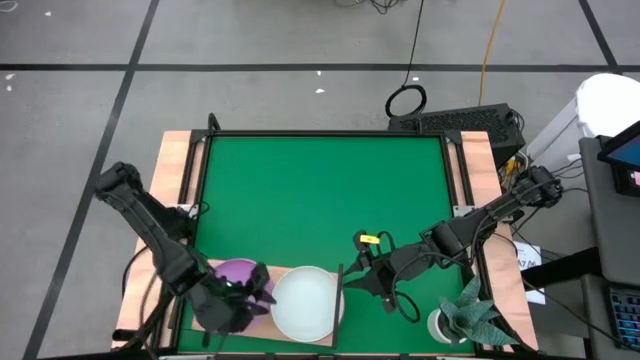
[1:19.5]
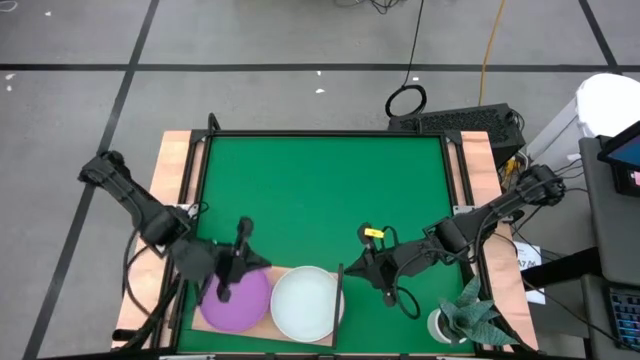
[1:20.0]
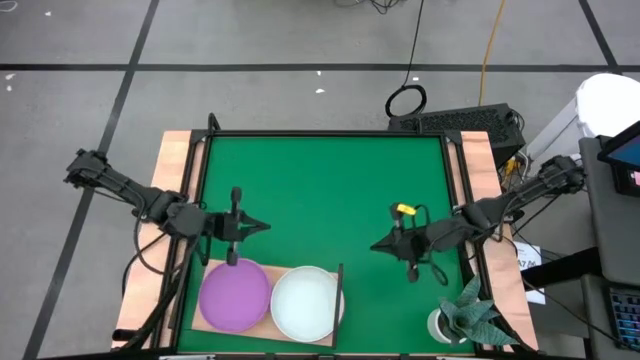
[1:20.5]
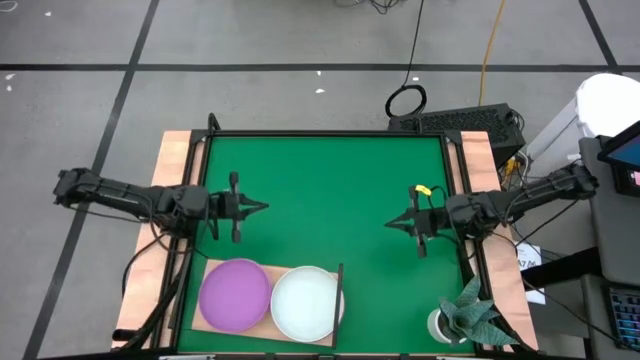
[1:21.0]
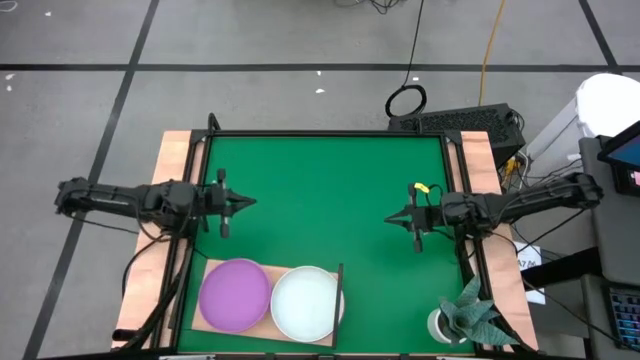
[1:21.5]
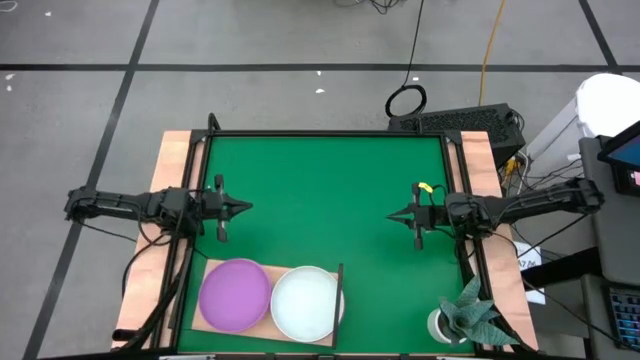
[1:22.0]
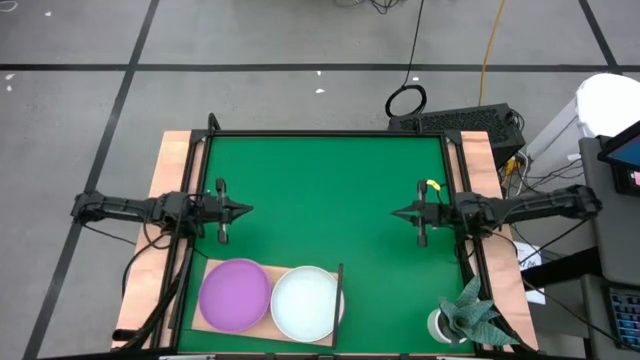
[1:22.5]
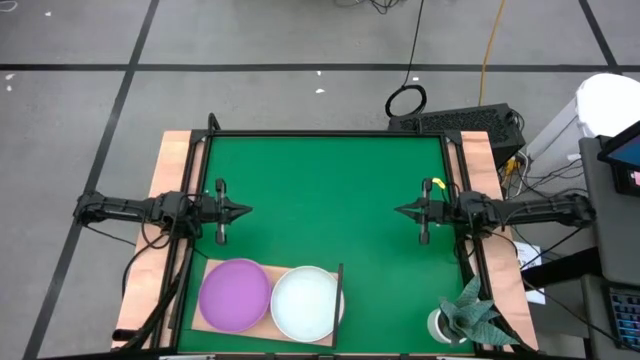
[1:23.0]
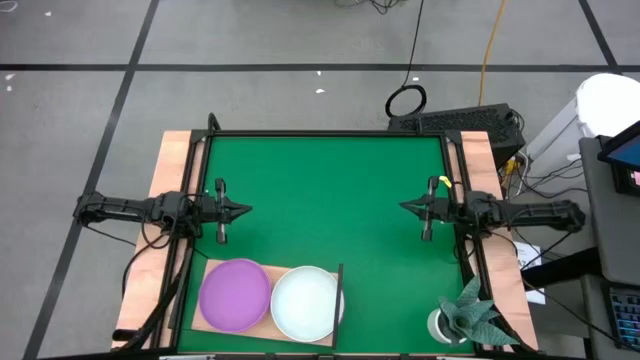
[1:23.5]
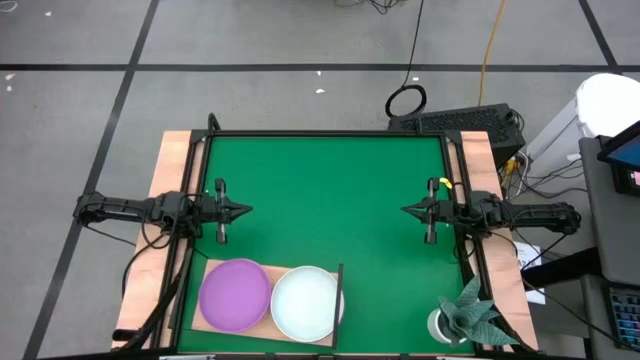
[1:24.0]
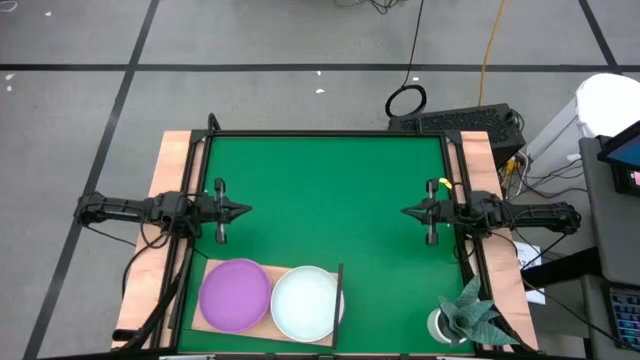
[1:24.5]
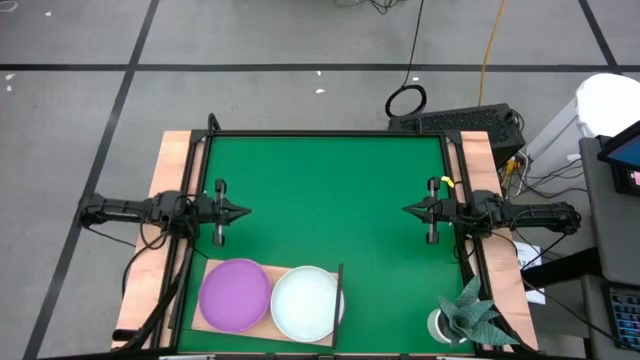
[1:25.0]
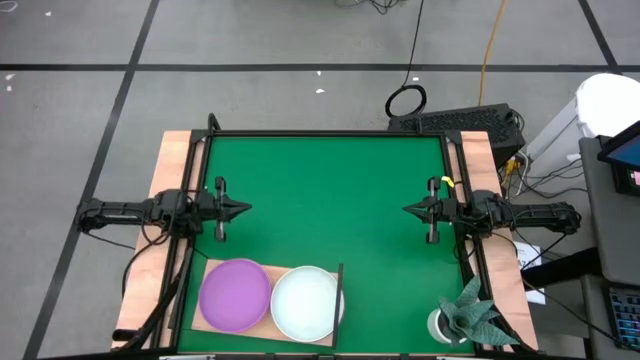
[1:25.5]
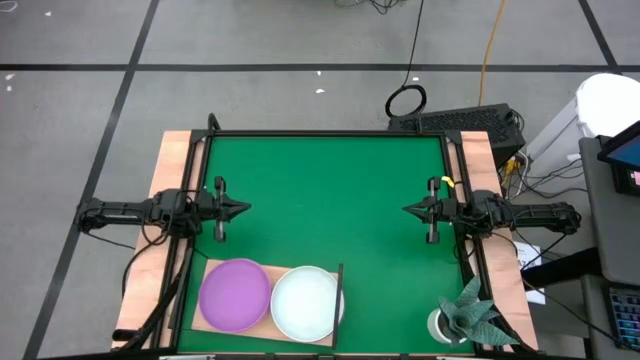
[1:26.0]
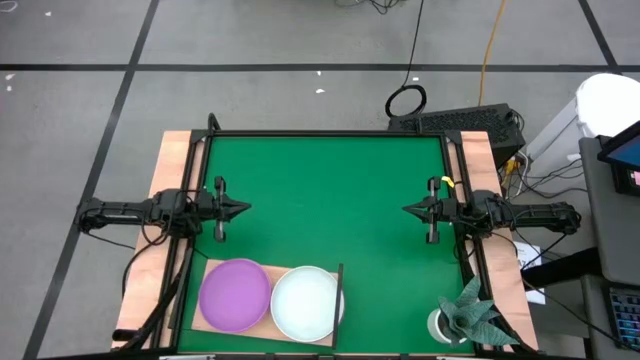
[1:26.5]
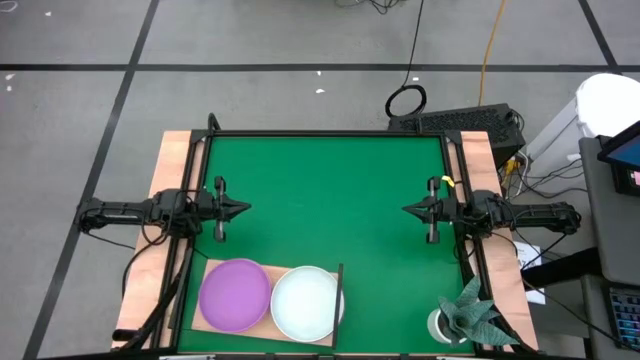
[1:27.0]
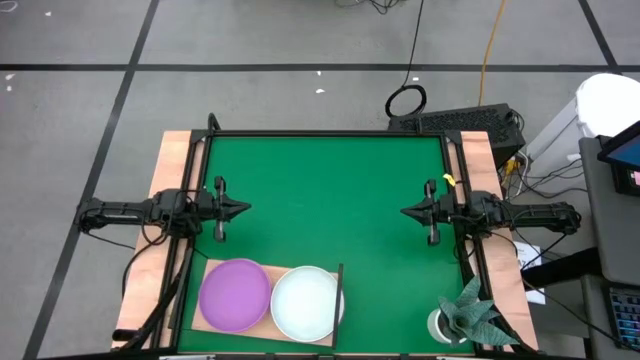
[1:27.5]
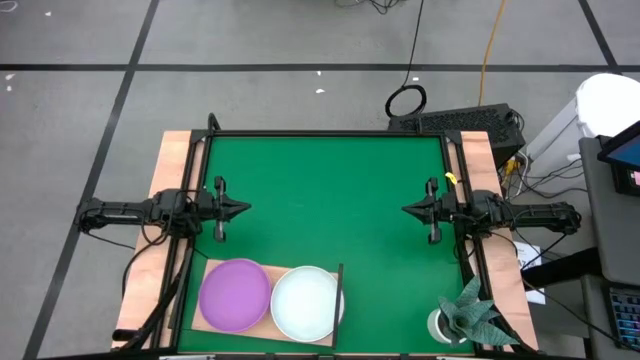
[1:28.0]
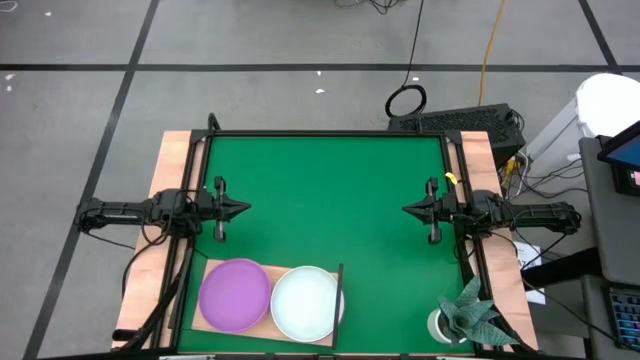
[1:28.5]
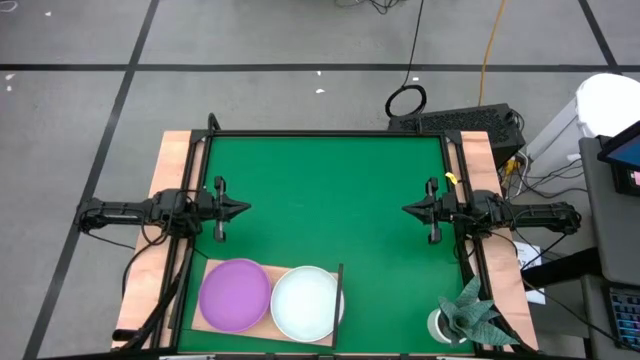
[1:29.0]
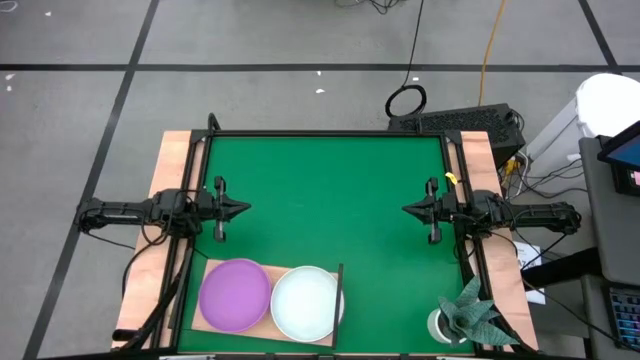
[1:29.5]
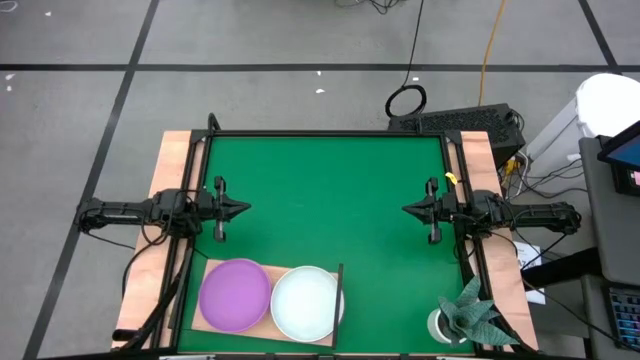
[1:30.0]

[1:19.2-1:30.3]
Task: Place and stack plates onto a shelf
Return to Home Position

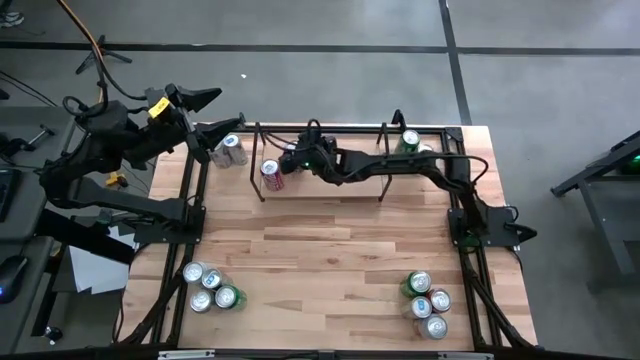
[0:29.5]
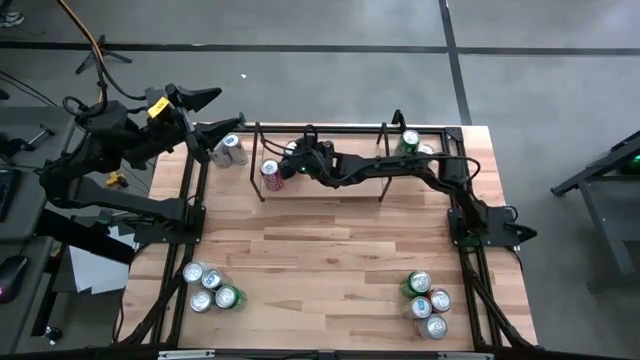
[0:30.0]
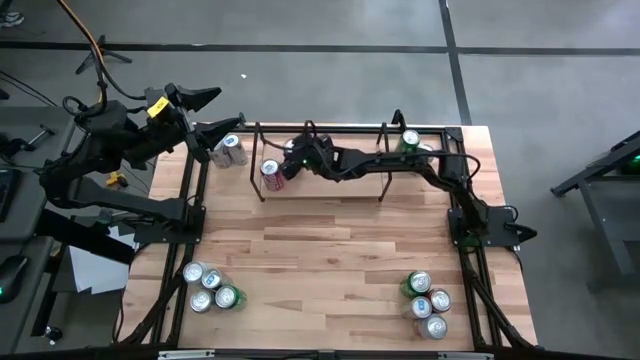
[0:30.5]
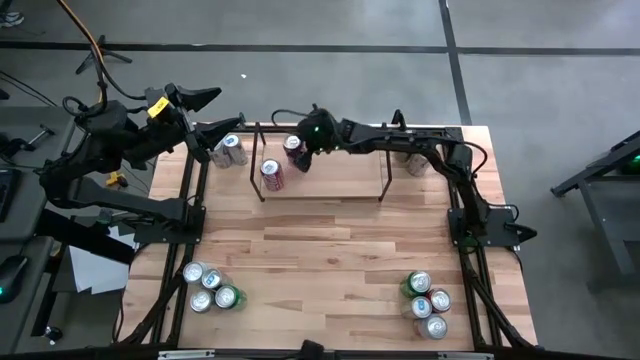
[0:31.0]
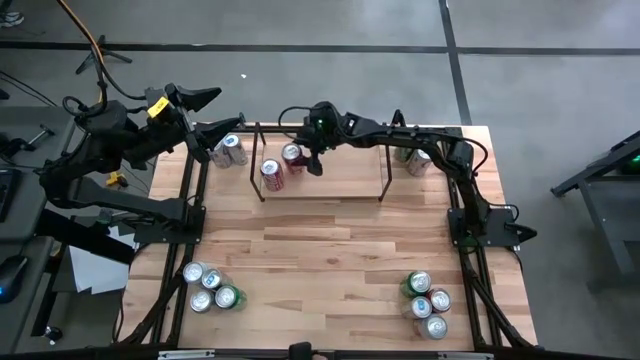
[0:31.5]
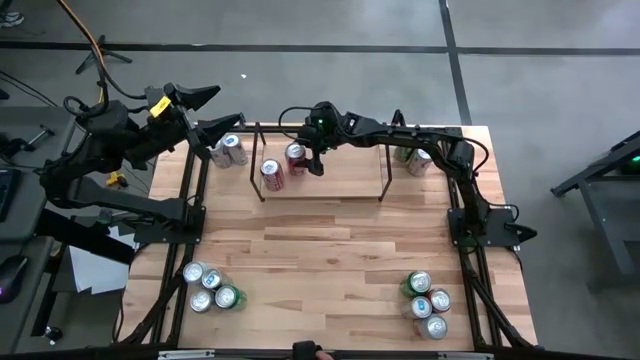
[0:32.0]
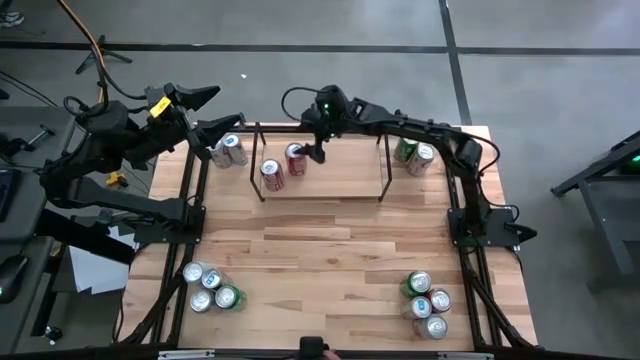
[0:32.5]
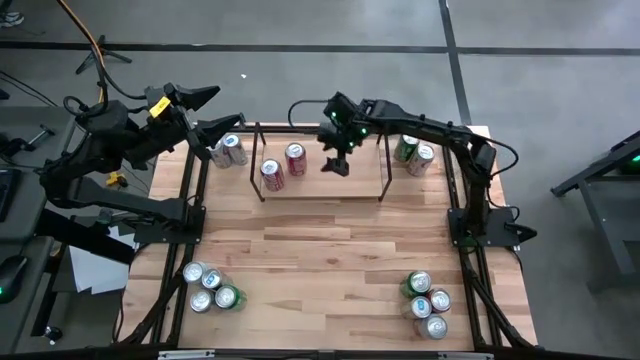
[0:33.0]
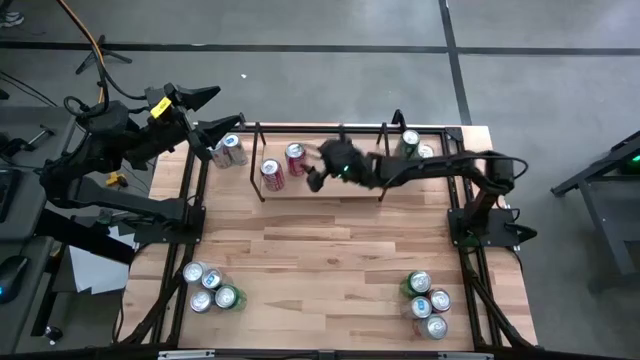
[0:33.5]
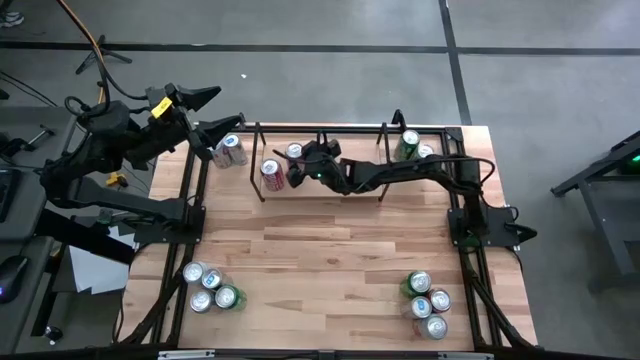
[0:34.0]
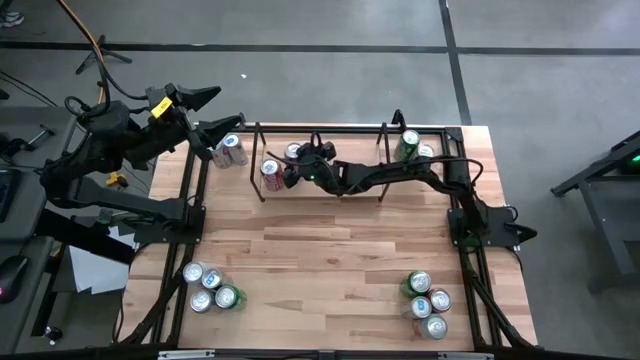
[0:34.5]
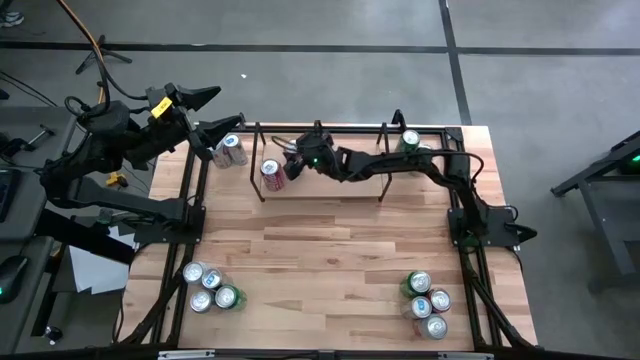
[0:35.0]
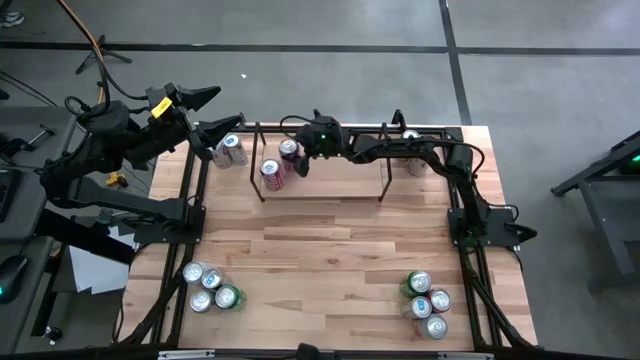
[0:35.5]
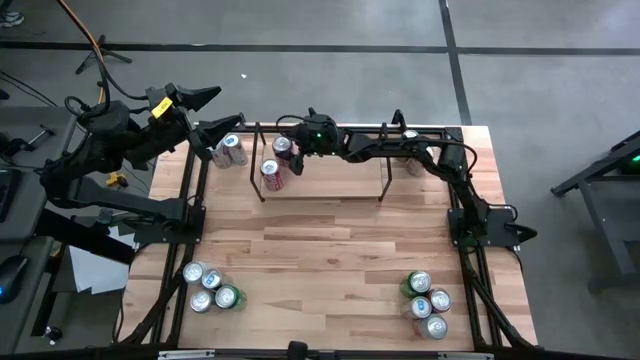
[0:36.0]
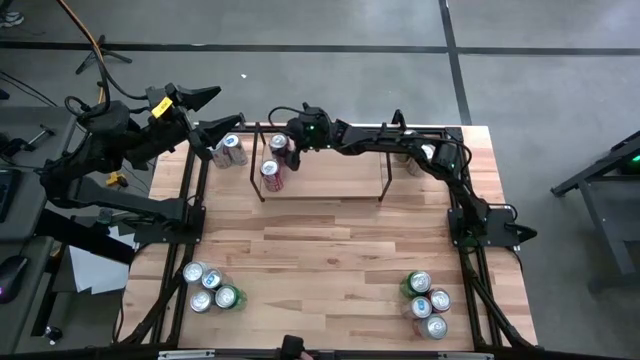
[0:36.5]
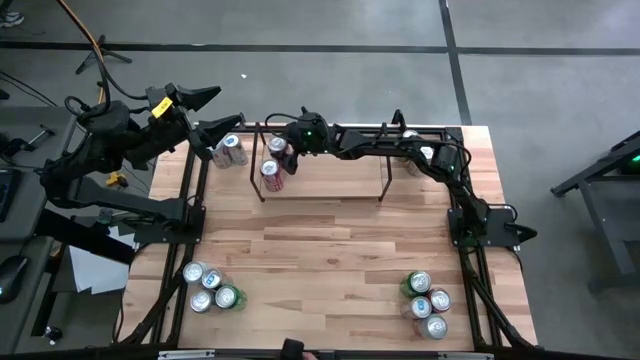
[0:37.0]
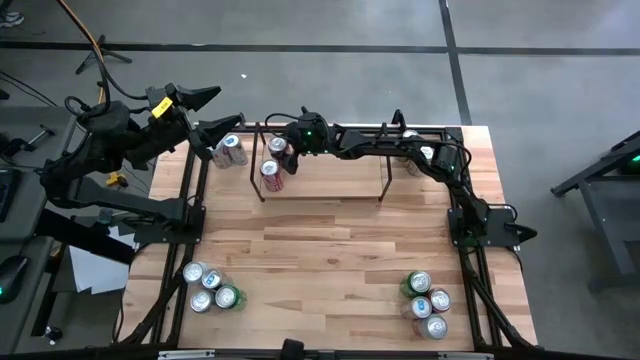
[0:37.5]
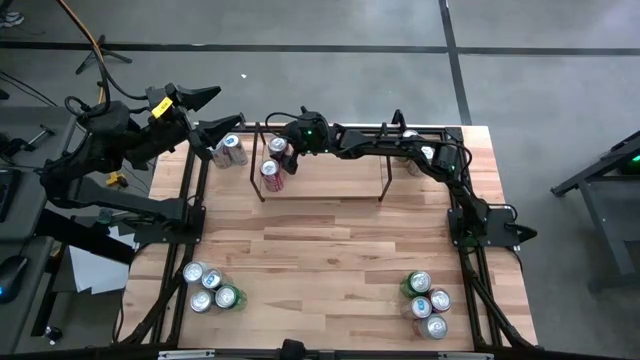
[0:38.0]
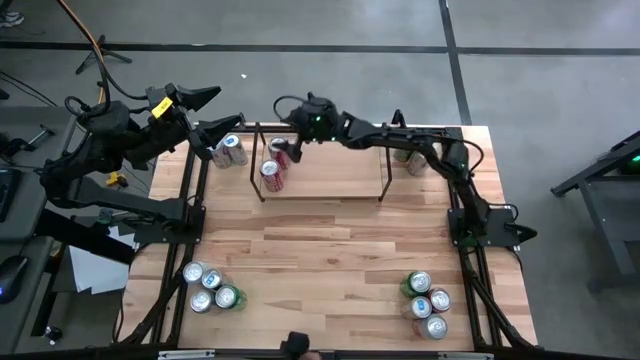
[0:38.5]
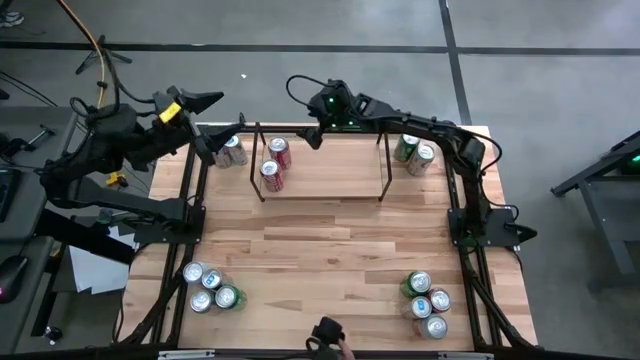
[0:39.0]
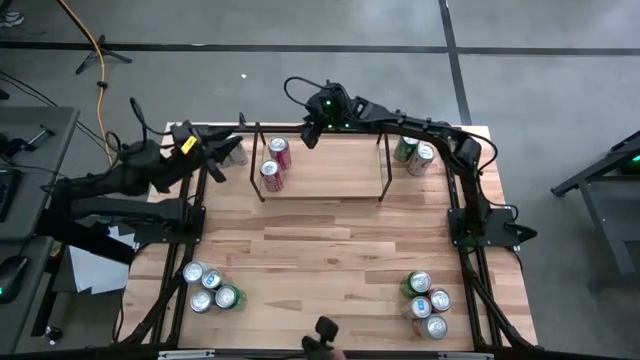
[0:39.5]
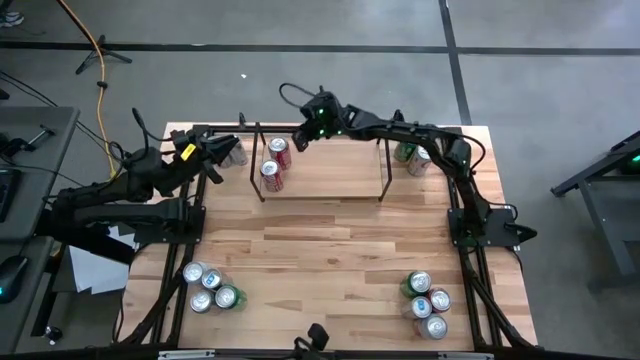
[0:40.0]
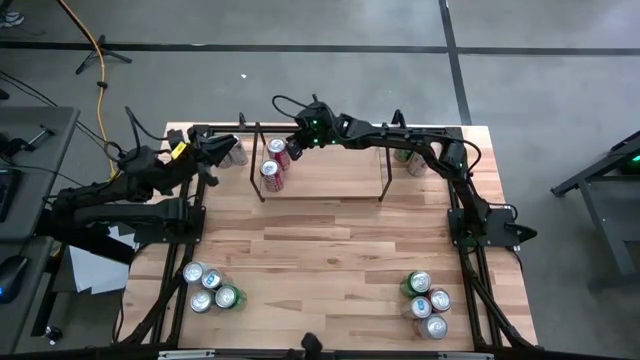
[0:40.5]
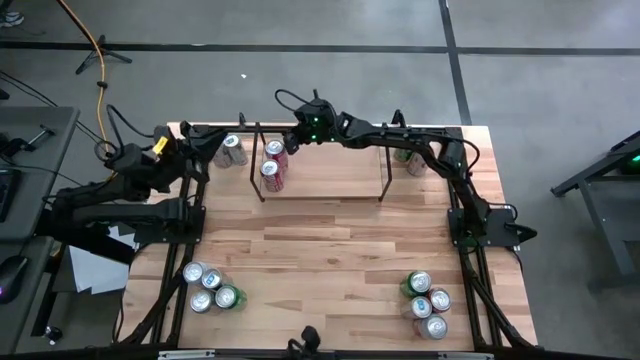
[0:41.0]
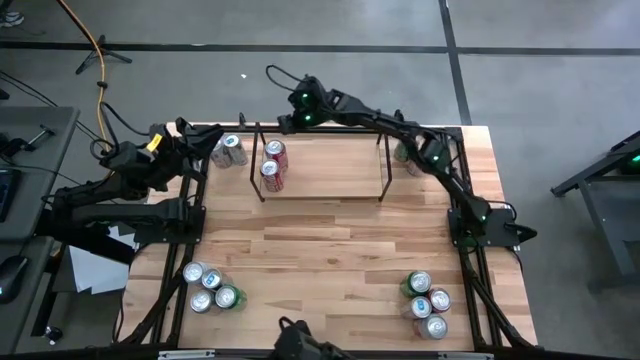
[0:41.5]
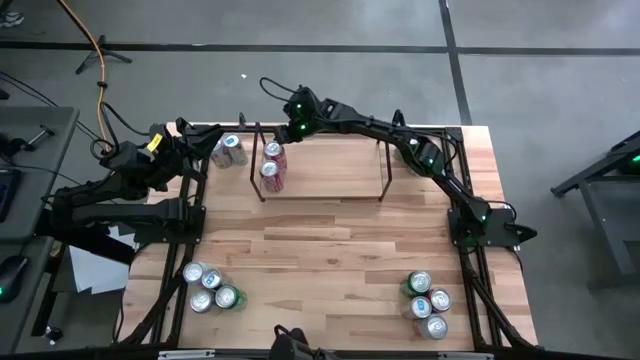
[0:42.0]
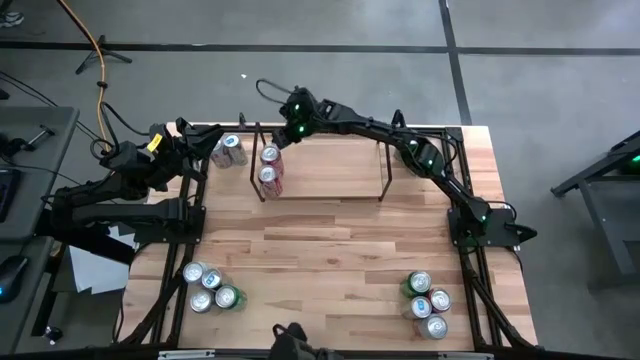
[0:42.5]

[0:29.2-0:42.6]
Task: Place canned beverage on shelf
Put the top red soda can on the shelf aligned with the other red soda can
